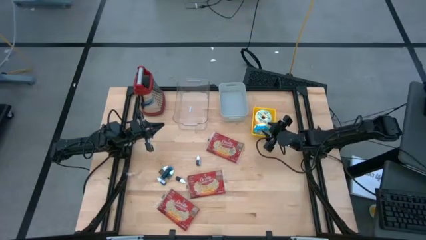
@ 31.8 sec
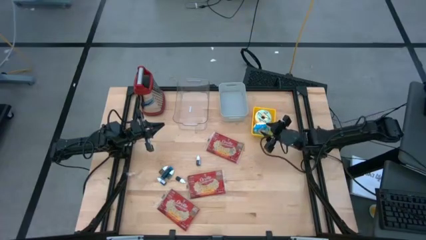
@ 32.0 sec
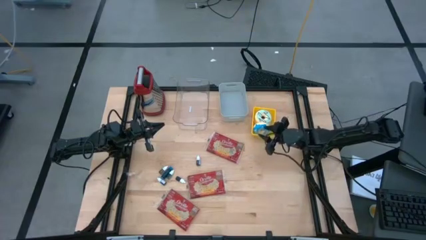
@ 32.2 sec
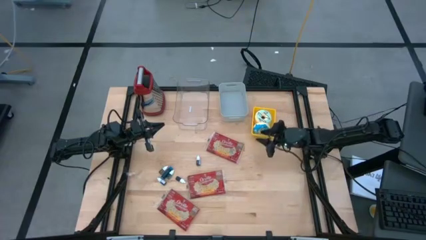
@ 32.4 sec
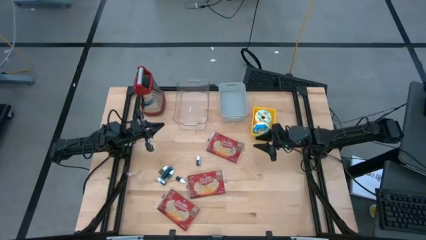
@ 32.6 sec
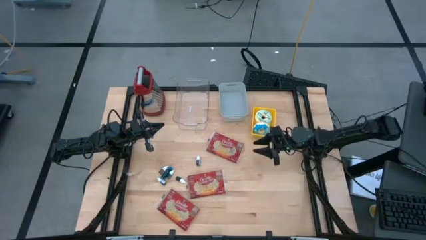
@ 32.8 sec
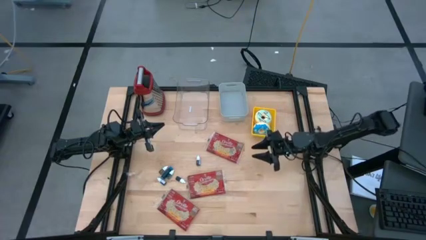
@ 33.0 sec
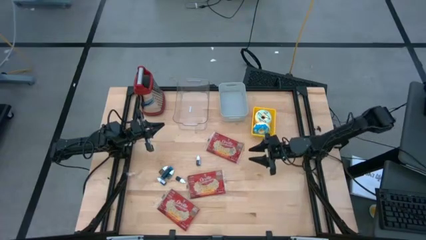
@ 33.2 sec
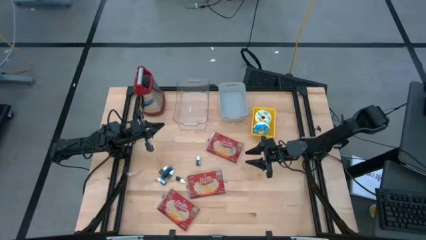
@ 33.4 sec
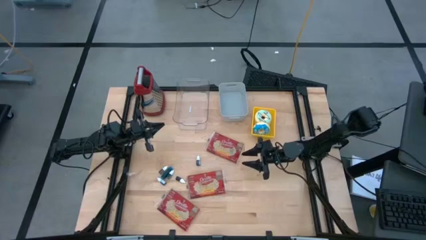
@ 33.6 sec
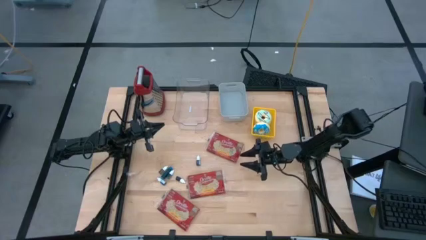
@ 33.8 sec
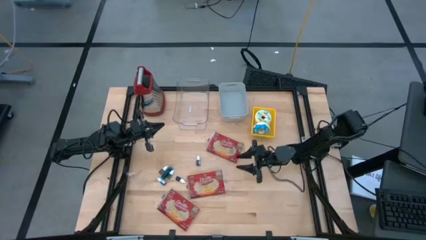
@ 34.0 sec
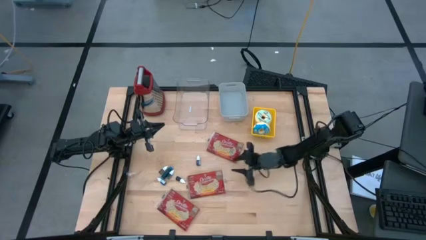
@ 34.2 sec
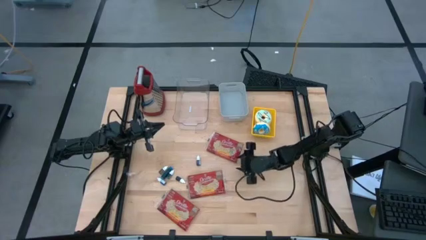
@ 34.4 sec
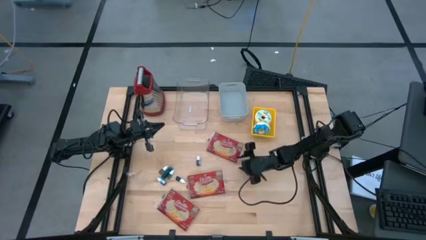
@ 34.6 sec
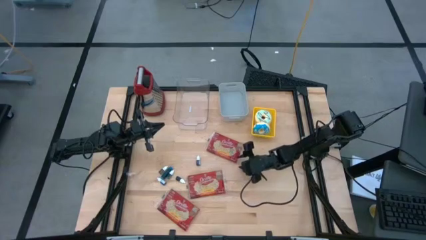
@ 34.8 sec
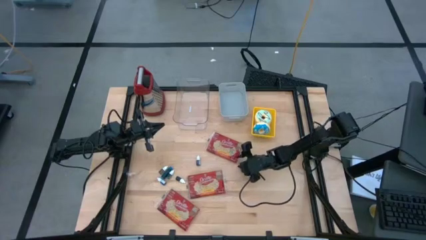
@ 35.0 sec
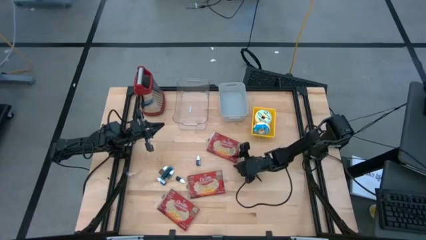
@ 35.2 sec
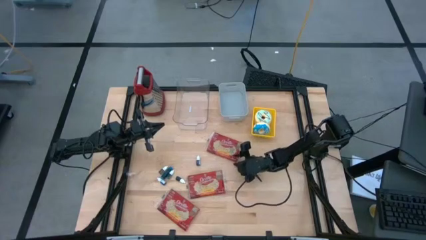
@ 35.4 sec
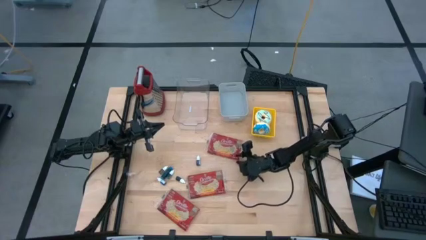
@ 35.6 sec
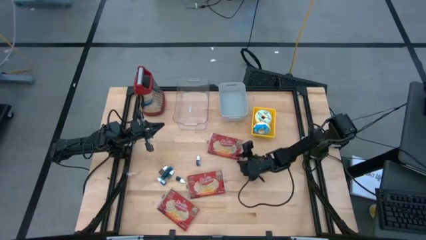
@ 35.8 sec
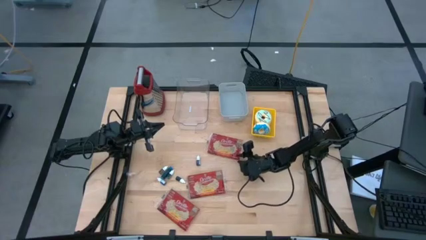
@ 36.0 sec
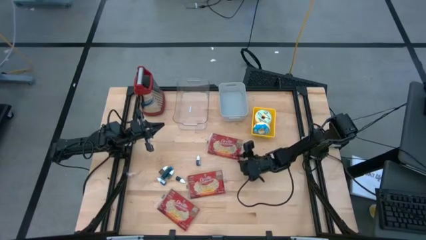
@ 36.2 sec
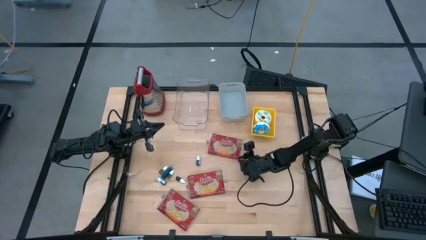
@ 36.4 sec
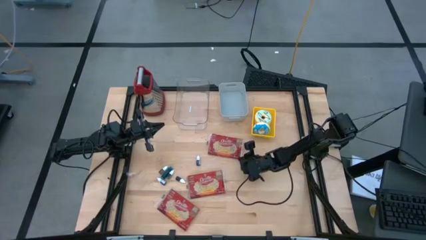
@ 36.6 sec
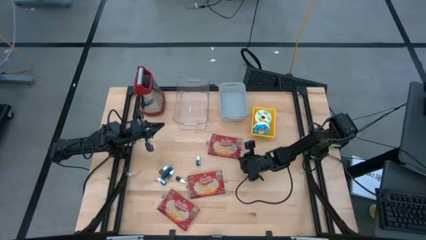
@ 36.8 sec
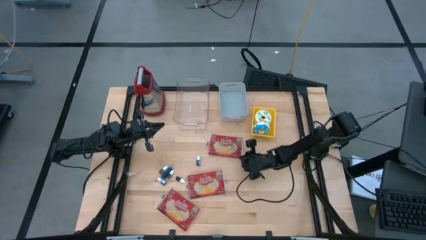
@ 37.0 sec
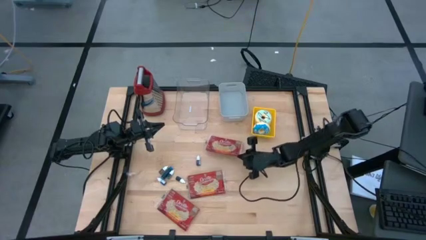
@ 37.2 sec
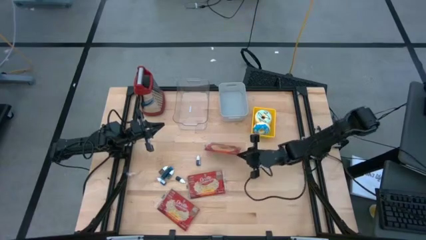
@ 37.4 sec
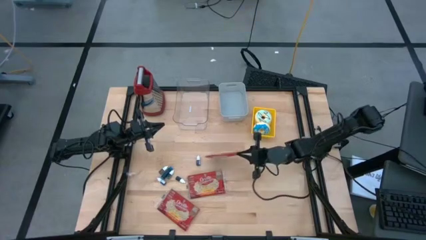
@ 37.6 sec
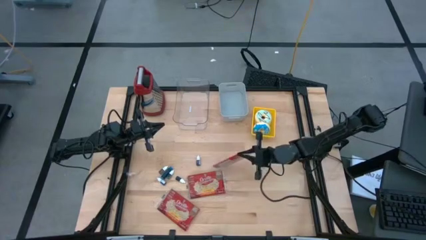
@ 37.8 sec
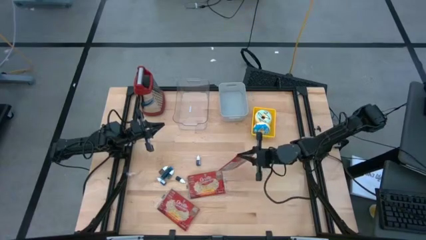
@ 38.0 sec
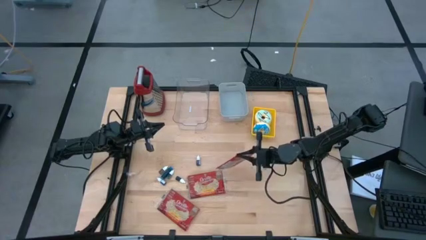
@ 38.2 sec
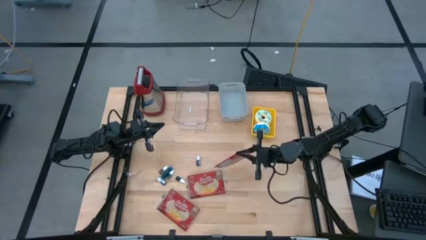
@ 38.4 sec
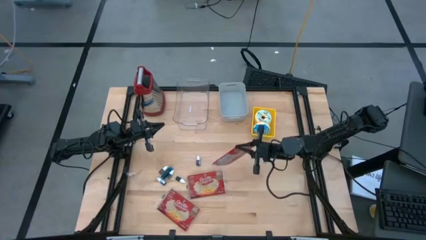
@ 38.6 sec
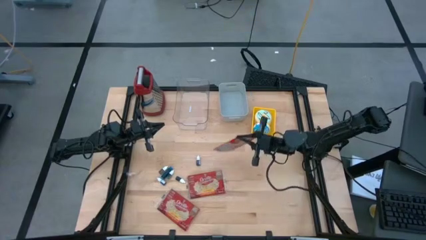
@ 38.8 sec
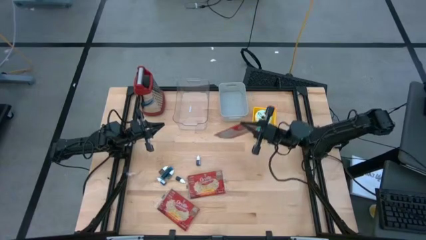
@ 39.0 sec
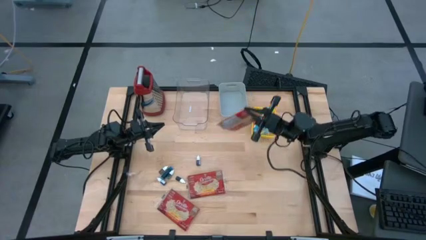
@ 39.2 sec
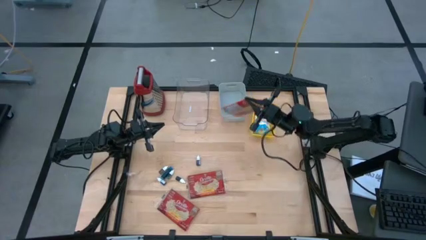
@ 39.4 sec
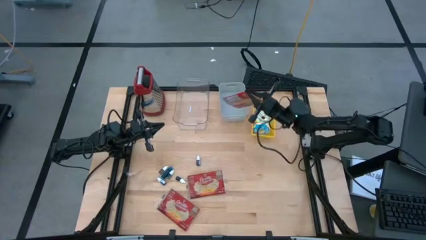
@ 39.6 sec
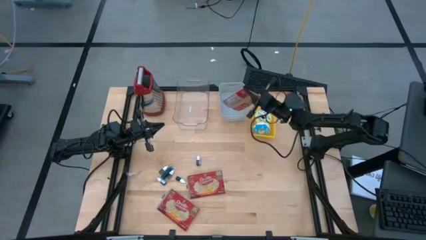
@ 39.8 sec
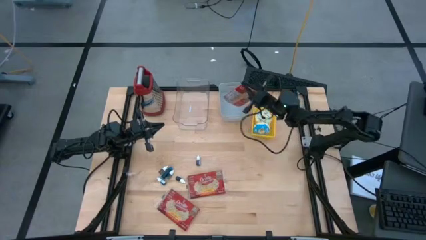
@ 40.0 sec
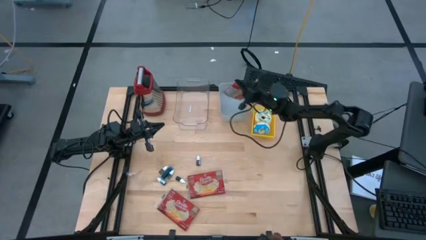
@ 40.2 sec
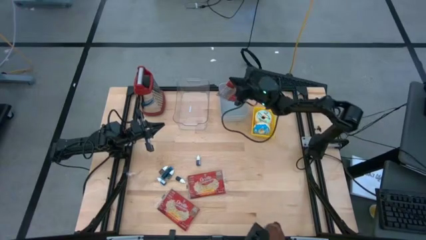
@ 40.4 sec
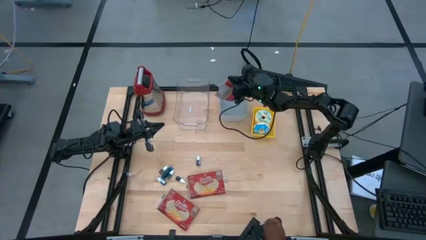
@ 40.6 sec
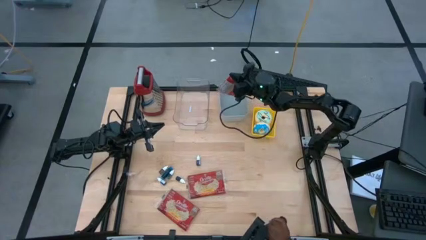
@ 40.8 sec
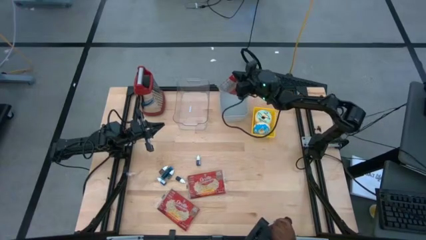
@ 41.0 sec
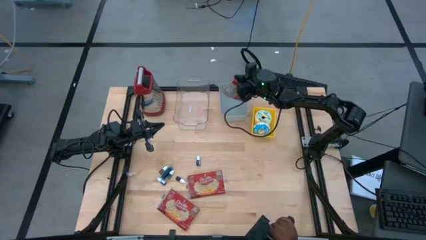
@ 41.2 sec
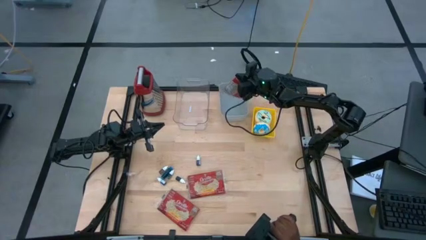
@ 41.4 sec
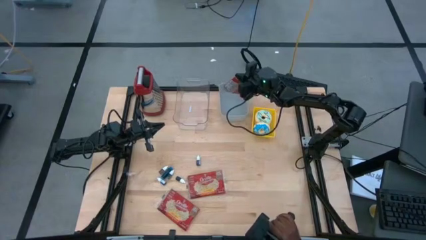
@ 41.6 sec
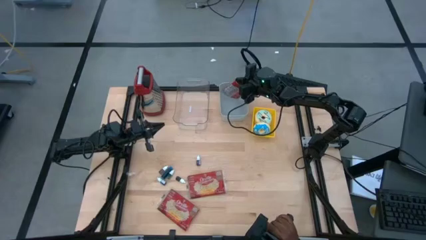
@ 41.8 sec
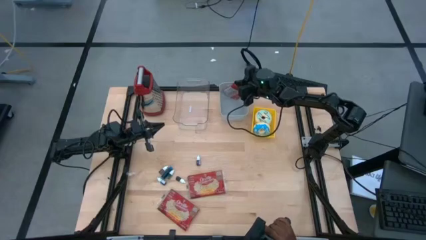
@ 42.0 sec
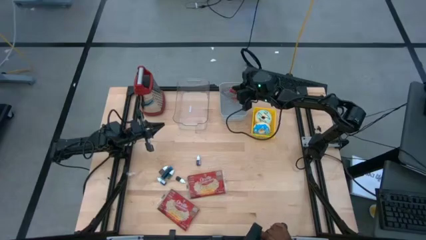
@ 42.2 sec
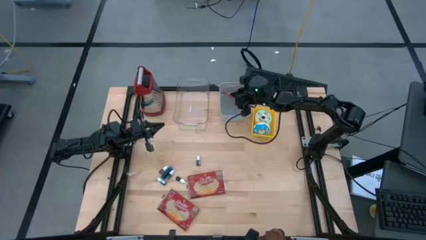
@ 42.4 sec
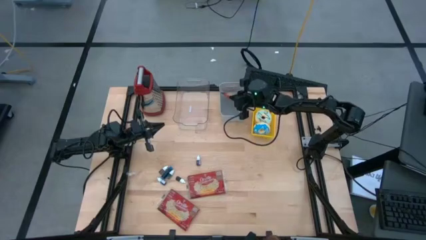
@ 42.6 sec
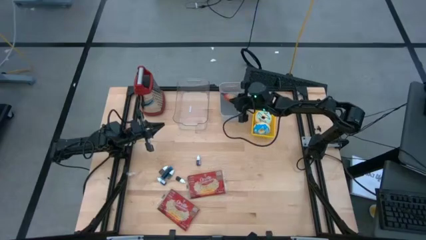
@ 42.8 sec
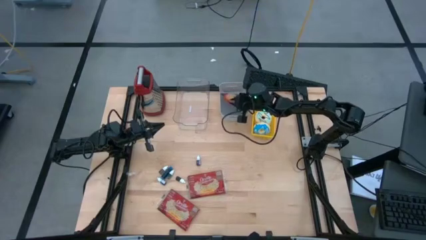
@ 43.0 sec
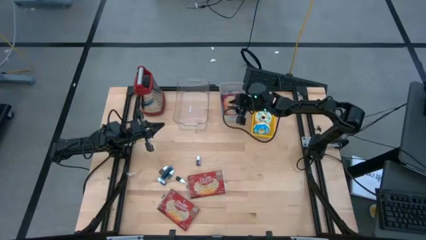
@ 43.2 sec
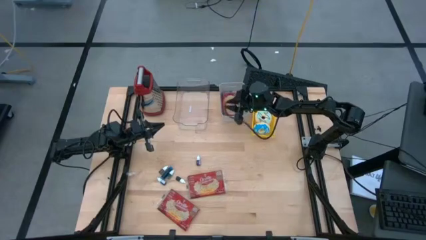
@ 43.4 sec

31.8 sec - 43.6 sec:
Task: Pick & Place Food Item
Put the top popcorn bag into the gray bin

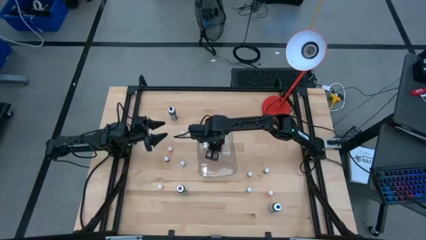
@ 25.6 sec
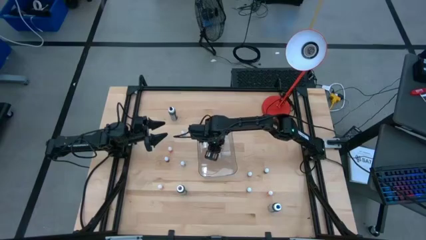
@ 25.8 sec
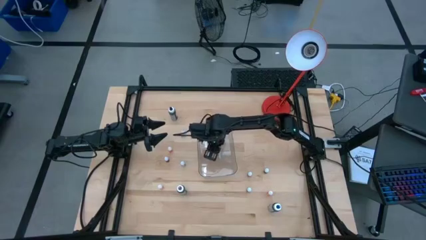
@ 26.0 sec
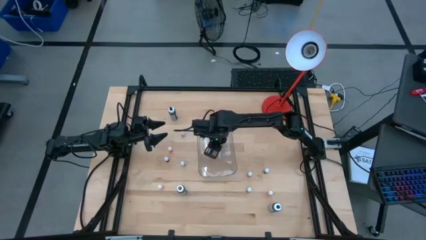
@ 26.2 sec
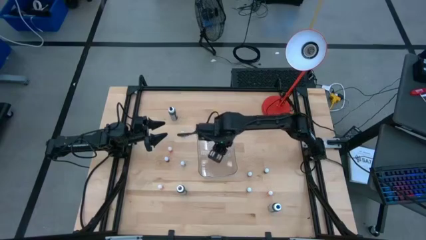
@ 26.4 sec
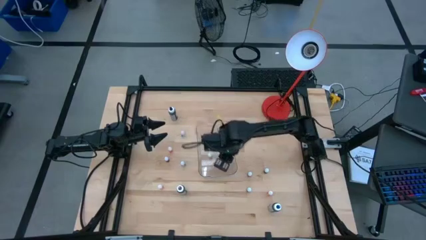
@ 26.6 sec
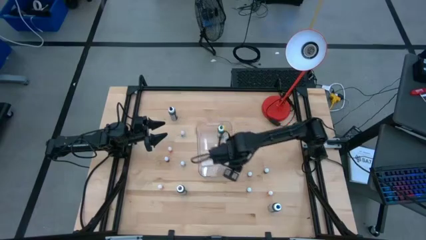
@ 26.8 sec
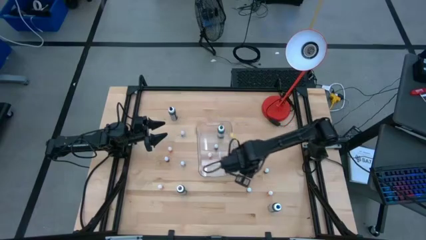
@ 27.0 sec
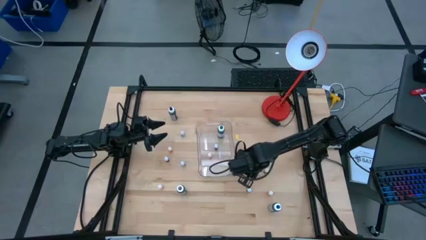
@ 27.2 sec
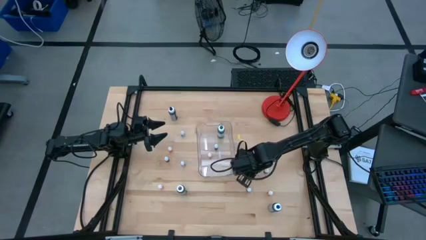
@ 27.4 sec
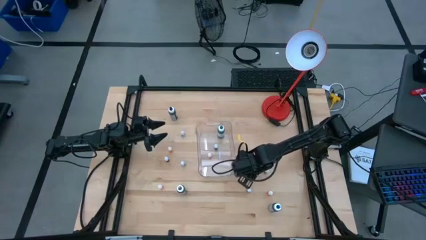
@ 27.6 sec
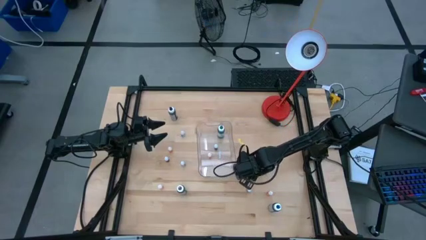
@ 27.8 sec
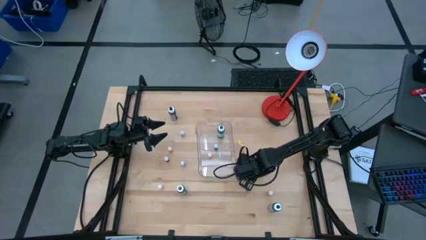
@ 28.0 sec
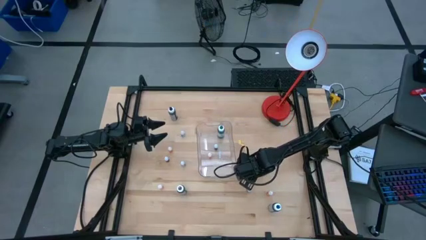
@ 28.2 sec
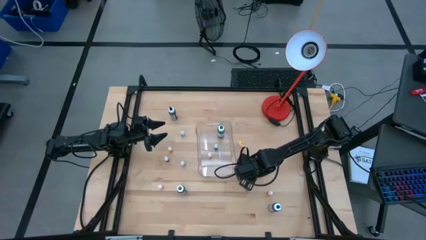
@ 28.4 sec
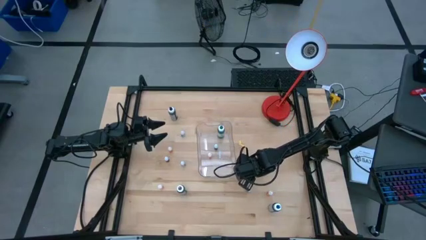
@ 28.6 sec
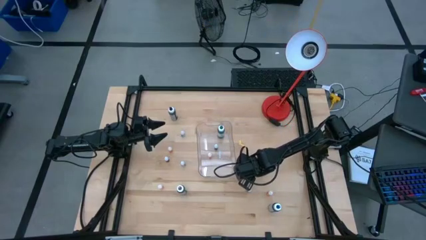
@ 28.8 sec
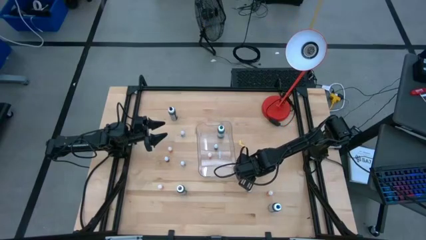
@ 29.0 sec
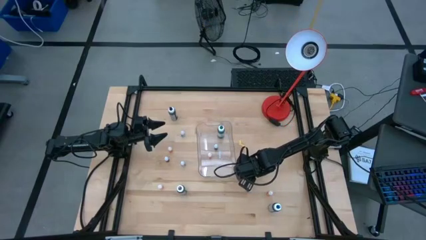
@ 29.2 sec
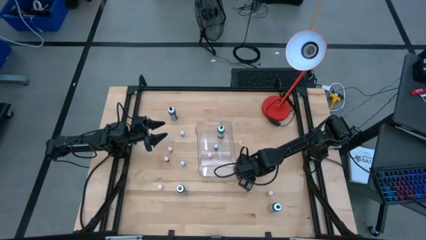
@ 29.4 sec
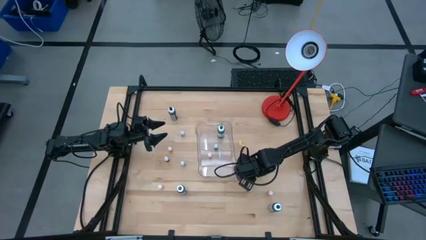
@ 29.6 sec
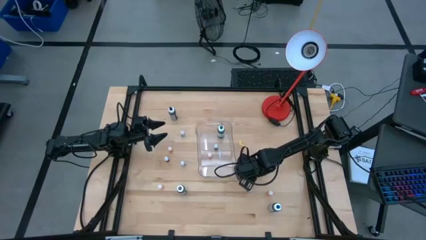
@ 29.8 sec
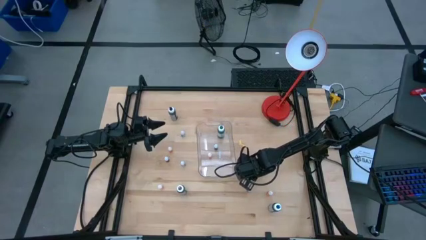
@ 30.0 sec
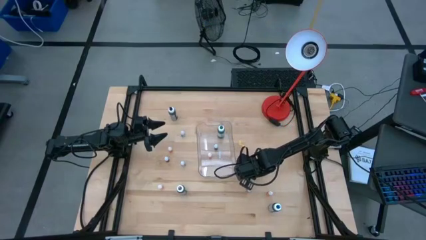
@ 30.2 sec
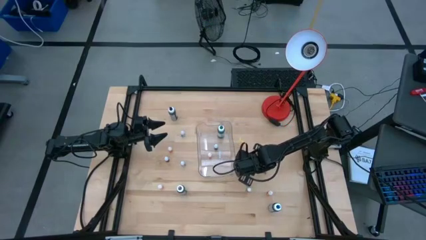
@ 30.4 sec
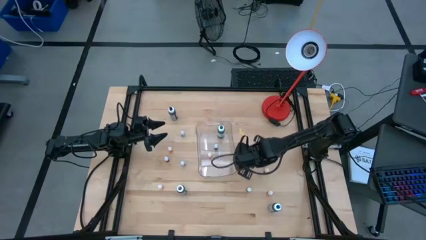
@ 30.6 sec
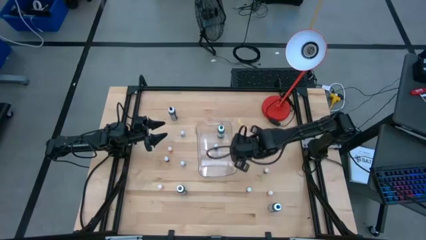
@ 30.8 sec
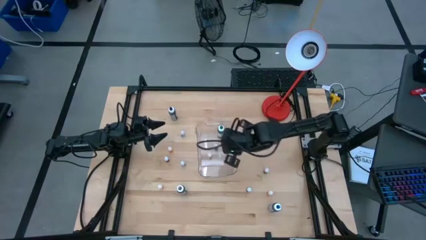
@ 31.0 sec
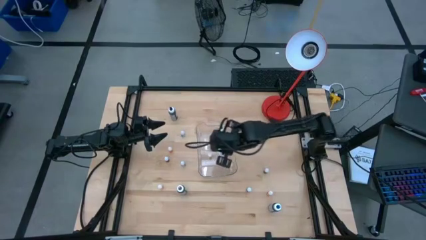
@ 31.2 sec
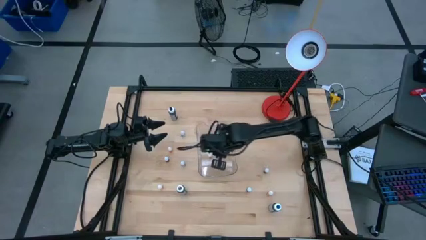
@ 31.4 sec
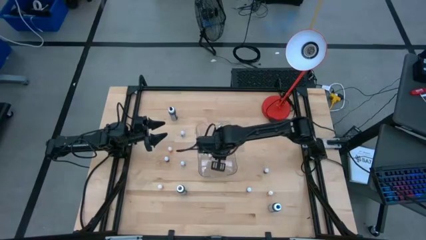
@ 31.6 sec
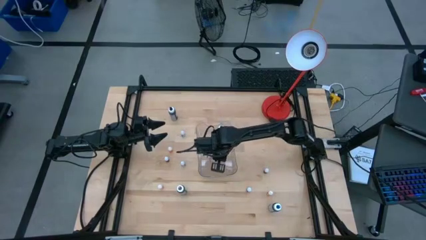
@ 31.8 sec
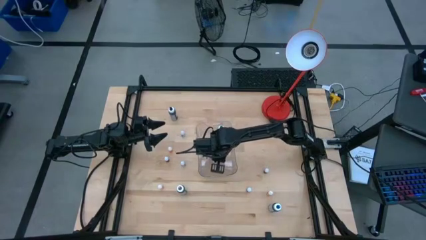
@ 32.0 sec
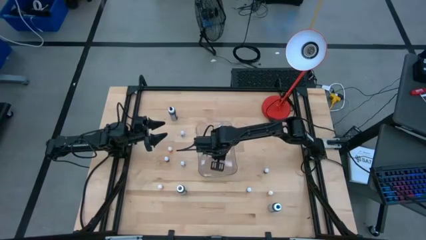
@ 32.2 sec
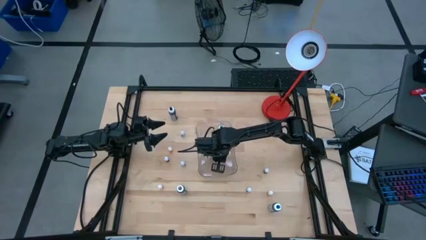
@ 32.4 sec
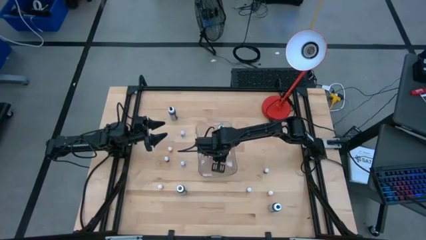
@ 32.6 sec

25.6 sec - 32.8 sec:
Task: Pick & Place food coloring
Put the small orange food coloring bottle into the transparent bin
